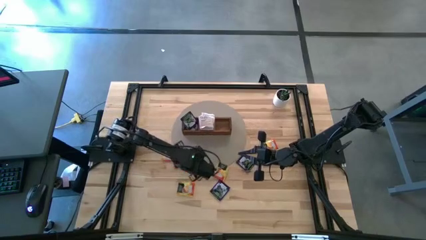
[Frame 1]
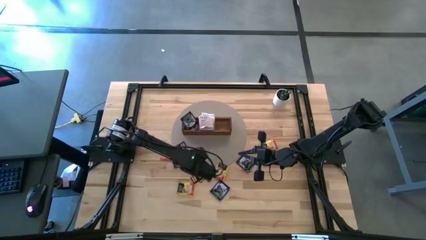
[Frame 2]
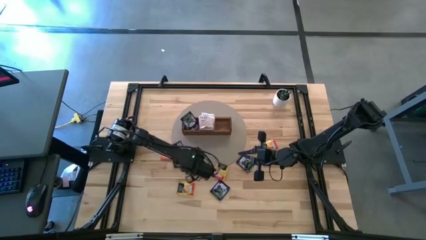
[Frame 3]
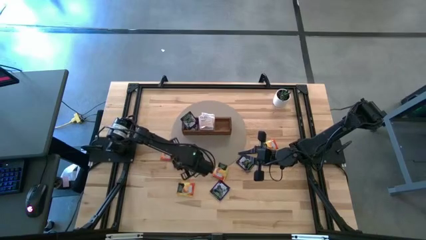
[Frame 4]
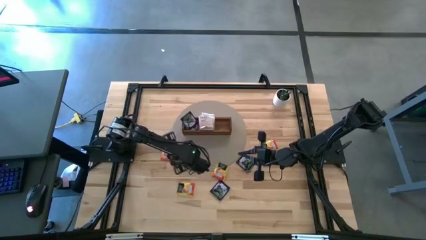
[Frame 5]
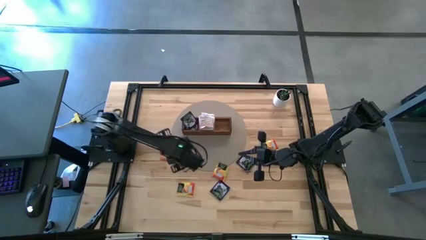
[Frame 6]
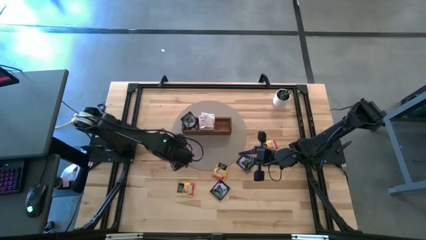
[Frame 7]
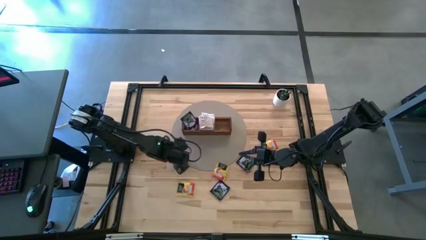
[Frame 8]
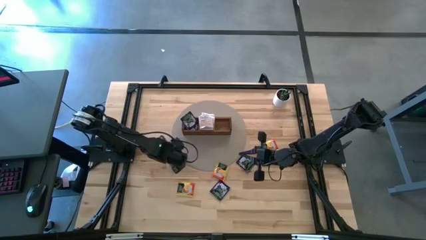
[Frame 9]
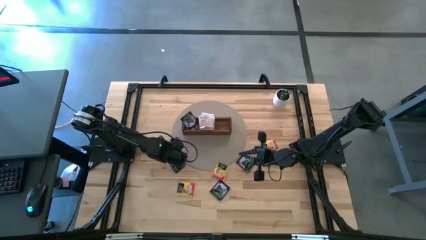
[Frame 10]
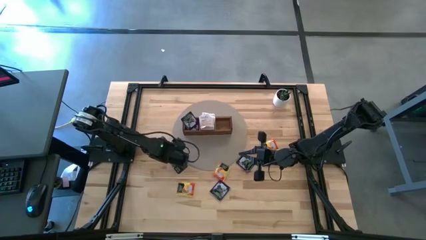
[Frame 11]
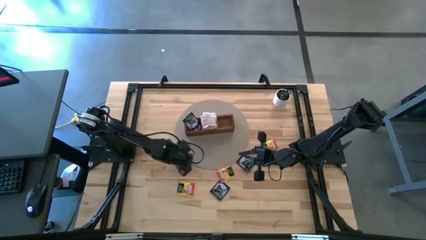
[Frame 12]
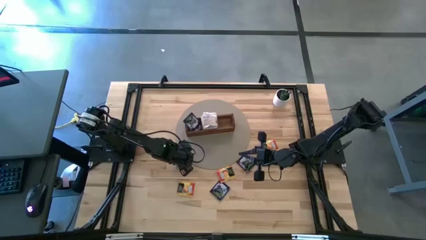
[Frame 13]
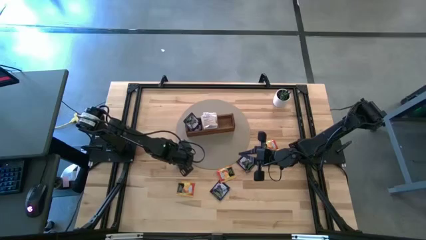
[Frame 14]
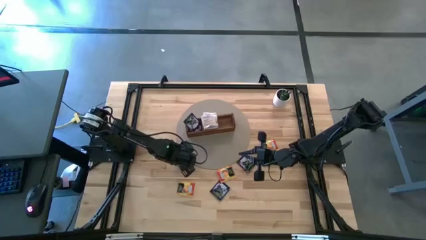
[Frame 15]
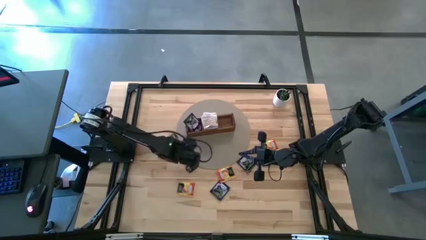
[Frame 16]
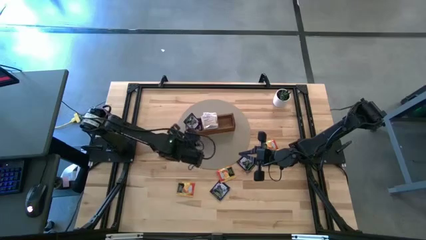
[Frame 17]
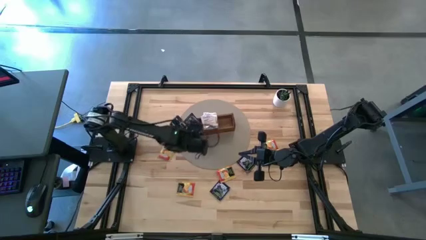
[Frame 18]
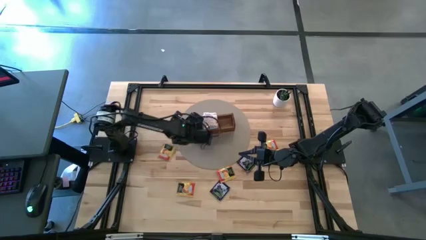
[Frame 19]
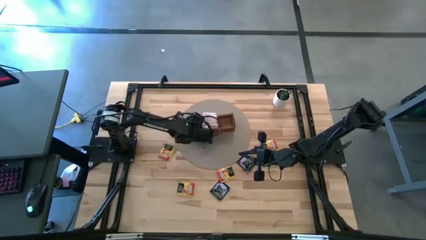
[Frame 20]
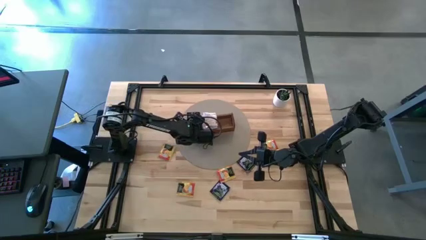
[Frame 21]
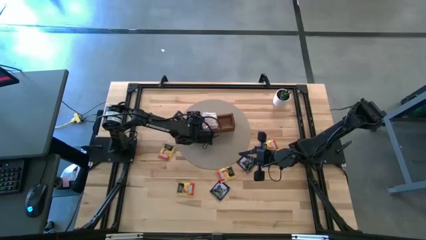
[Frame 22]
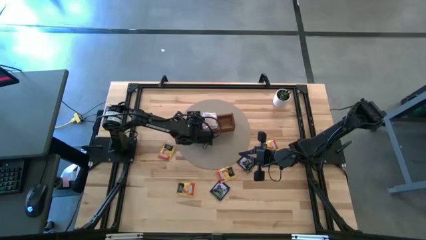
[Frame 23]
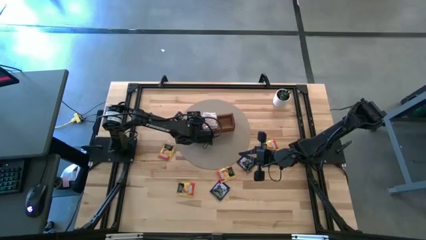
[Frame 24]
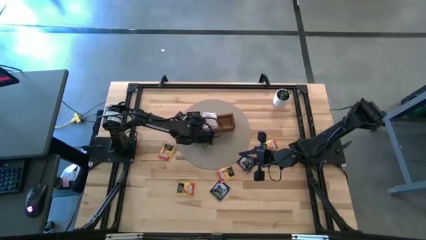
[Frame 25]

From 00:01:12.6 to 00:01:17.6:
Task: Pick & Place Tea
Put the purple tea bag into the left section of the wooden organizer

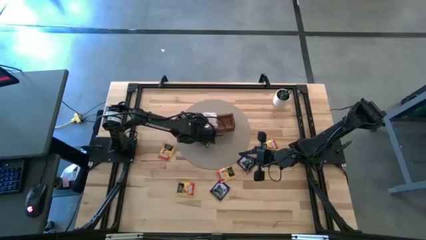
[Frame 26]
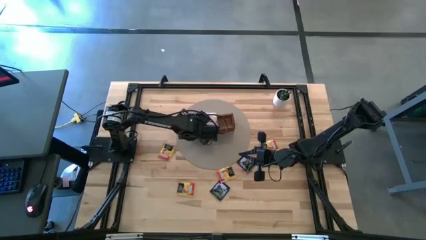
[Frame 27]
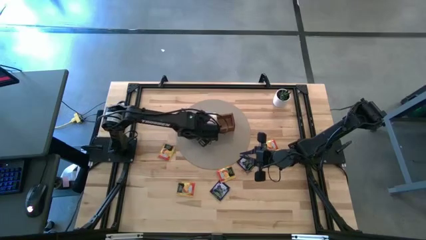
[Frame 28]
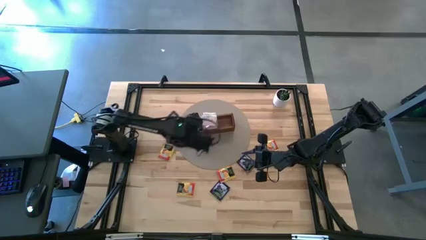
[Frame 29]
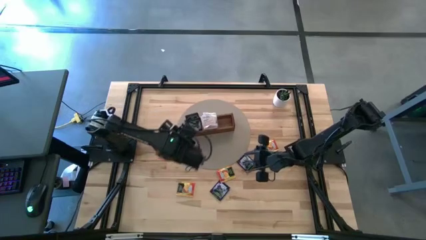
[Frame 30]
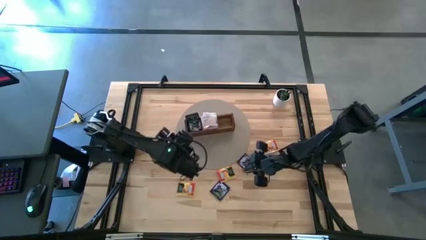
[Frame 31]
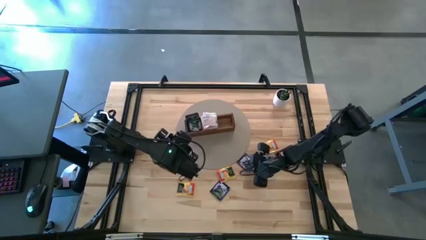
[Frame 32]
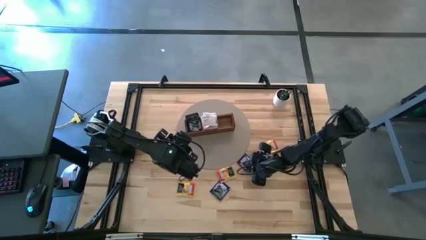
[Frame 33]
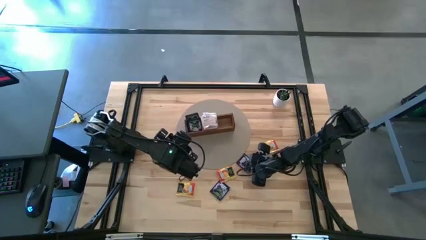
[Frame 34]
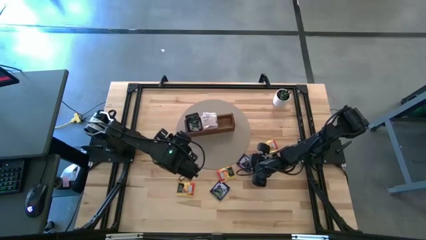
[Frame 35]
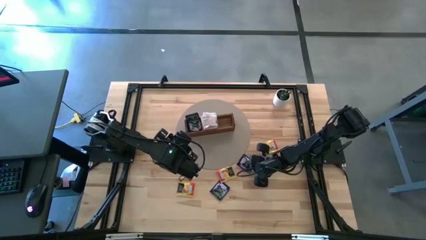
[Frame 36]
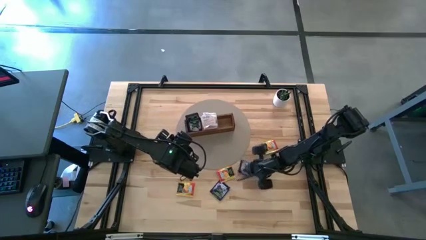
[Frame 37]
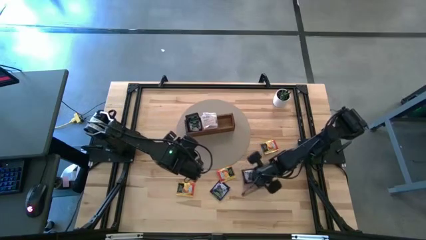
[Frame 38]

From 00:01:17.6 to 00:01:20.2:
Put the purple tea bag into the left section of the wooden organizer

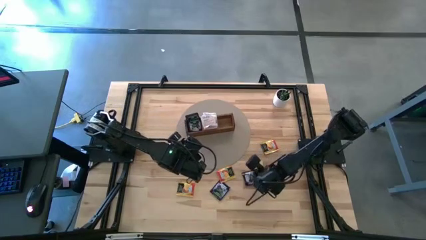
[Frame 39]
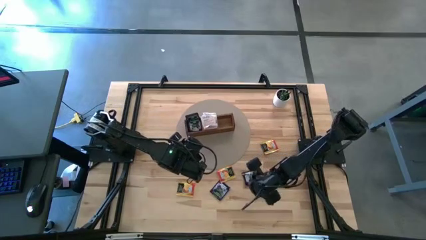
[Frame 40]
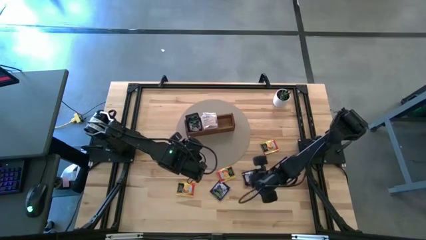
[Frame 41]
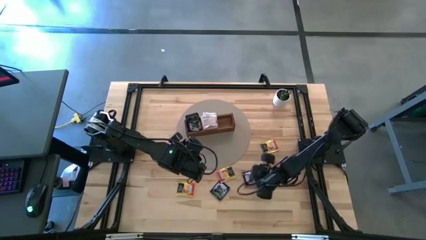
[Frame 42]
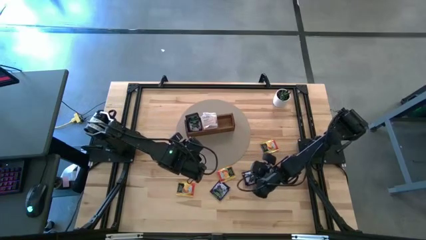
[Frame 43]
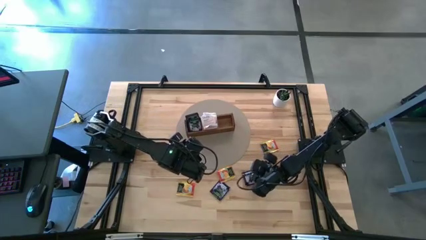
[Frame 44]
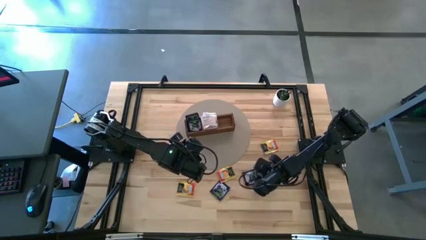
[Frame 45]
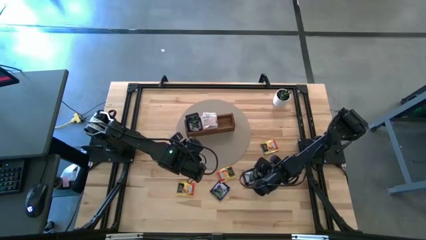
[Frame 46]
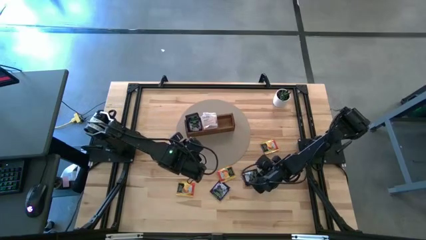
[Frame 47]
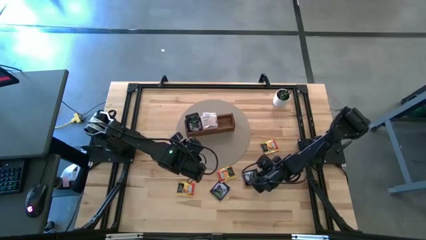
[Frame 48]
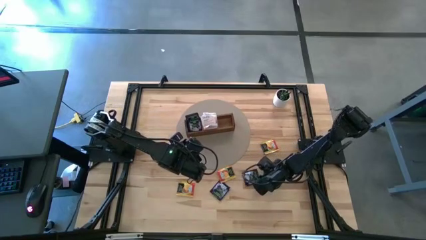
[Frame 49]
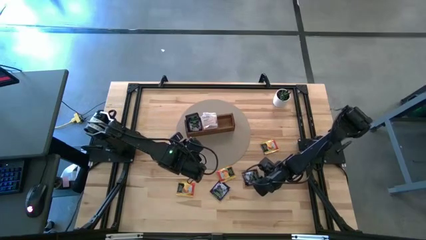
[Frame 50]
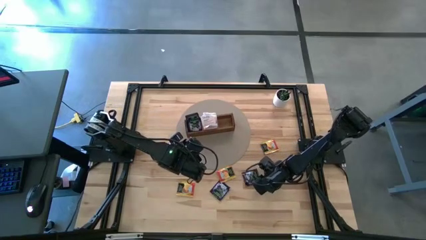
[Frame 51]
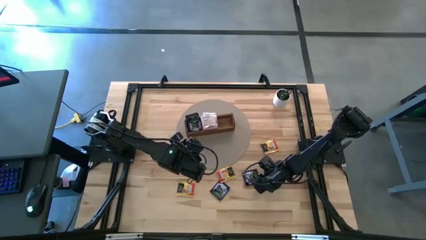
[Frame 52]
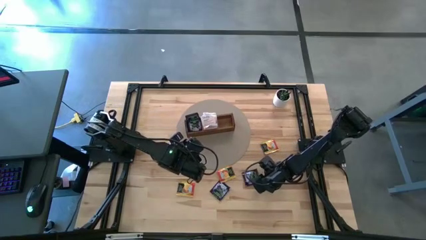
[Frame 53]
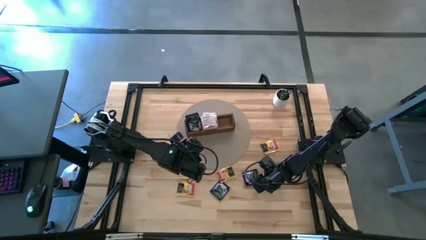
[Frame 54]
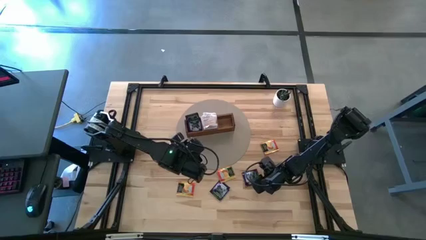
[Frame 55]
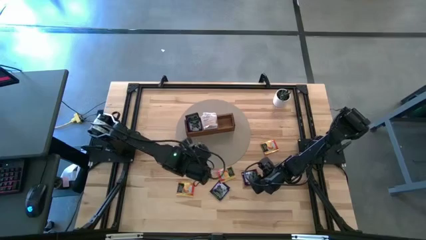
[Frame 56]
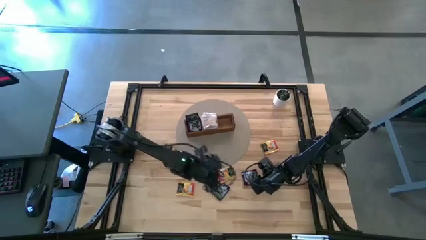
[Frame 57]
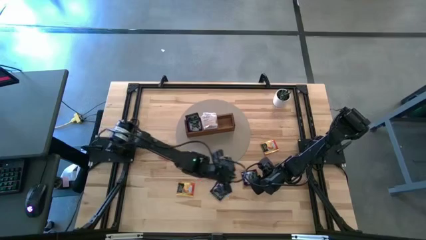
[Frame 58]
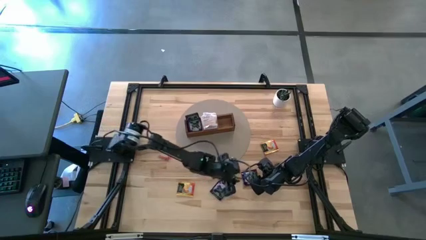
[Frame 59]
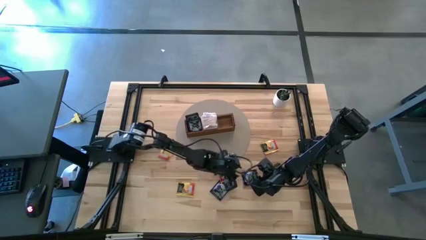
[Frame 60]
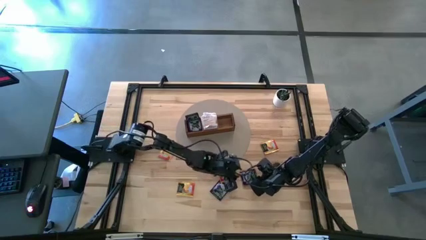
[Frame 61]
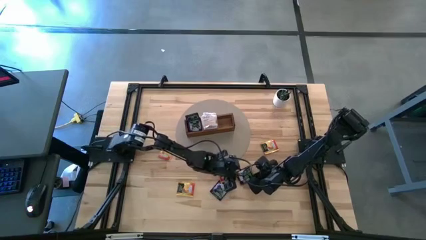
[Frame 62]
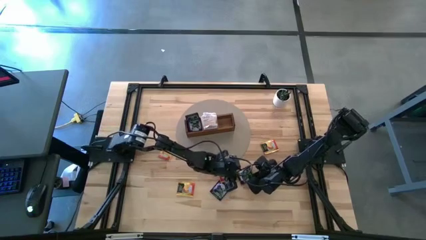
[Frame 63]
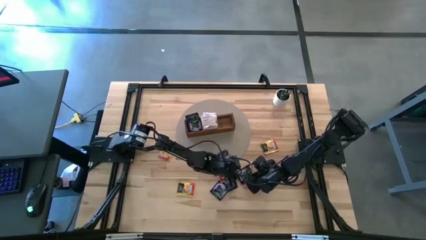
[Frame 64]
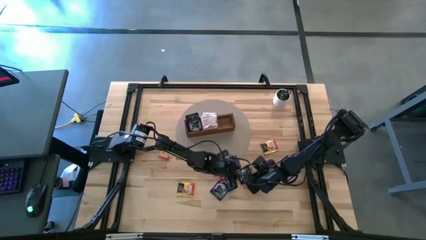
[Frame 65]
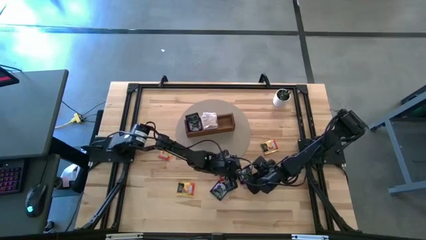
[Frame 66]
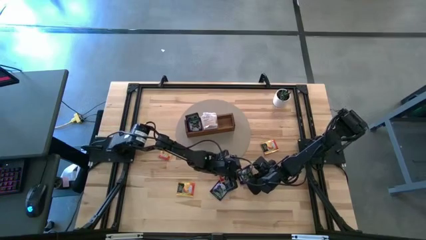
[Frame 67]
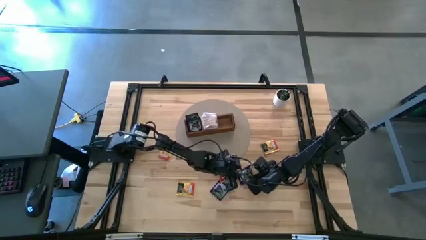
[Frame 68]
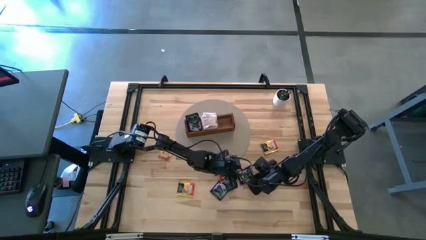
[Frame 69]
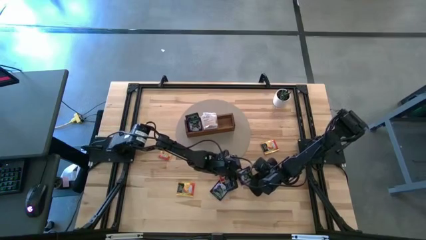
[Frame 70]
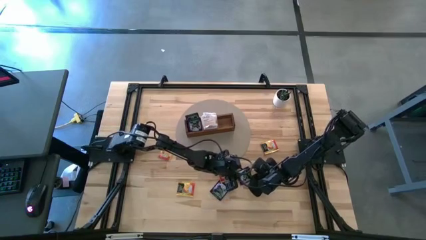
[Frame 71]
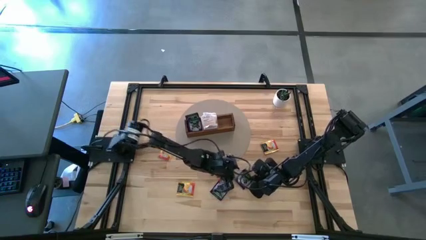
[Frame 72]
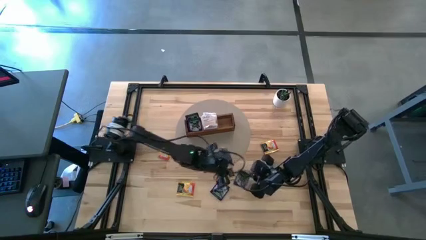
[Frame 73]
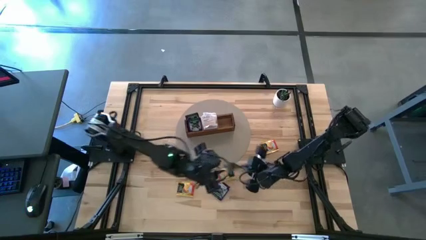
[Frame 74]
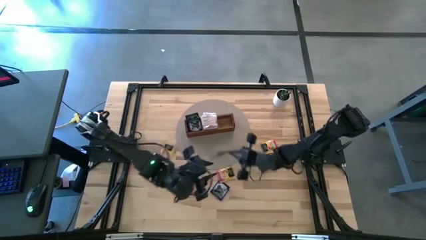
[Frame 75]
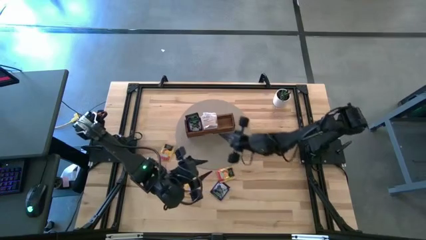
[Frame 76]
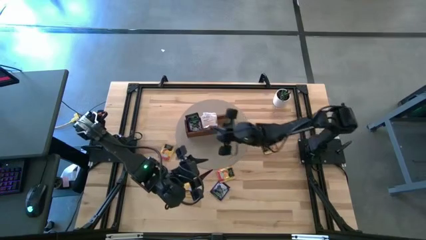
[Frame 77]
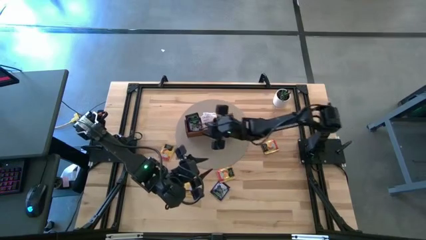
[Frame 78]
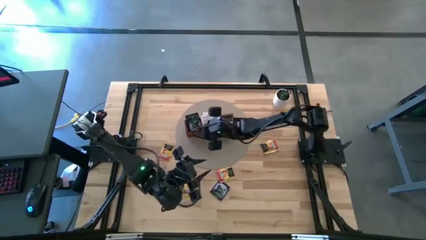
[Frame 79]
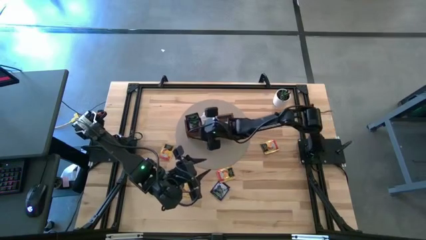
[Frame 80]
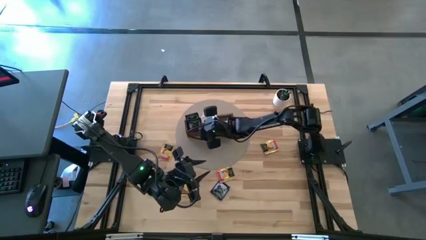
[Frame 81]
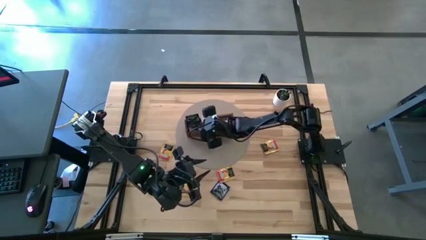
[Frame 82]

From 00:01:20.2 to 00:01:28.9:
Put the purple tea bag into the left section of the wooden organizer
